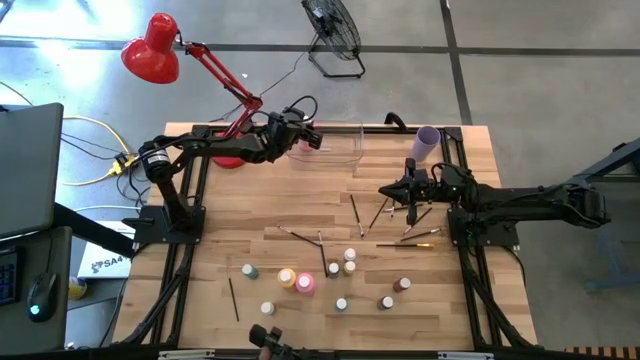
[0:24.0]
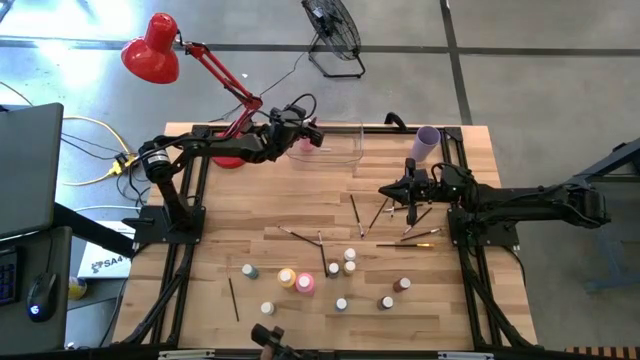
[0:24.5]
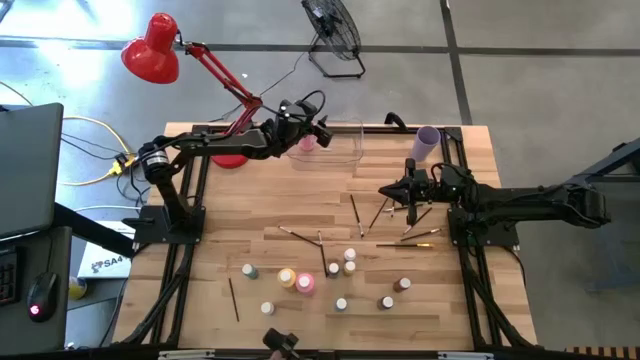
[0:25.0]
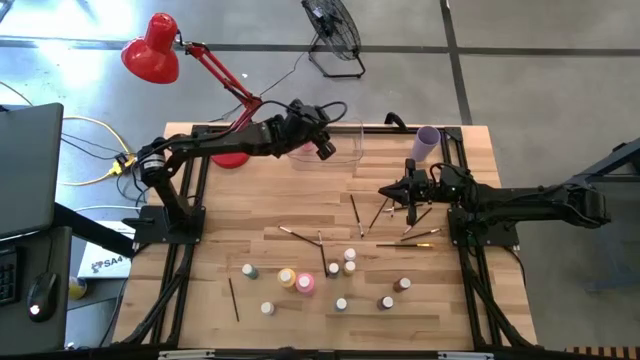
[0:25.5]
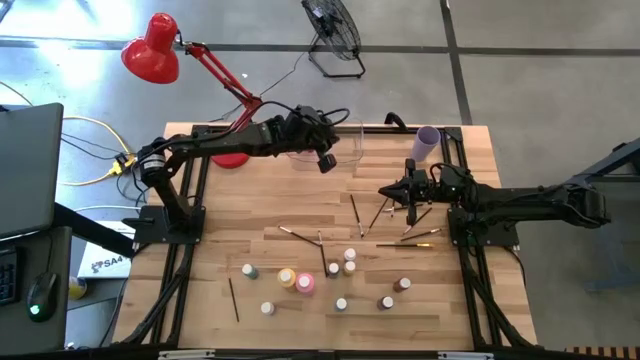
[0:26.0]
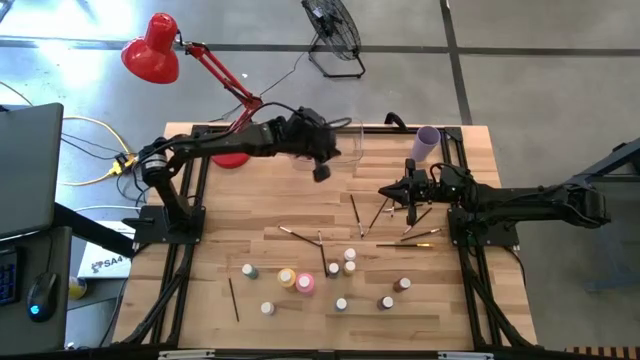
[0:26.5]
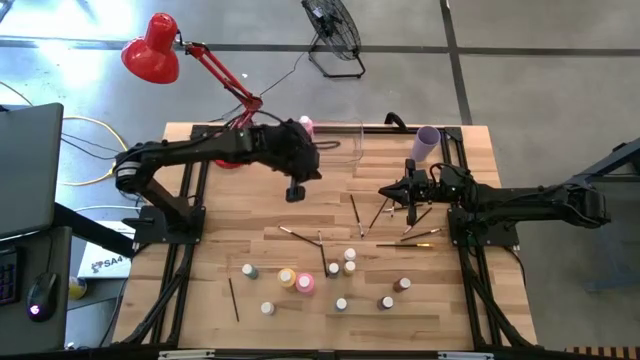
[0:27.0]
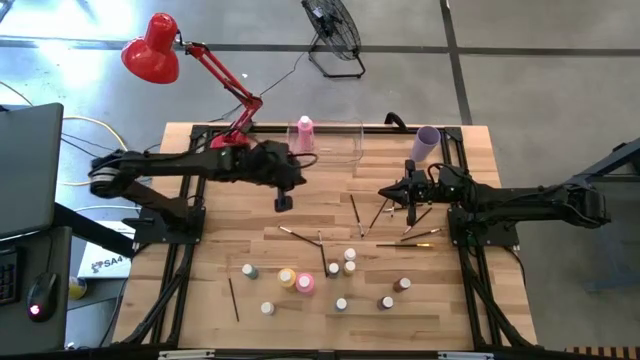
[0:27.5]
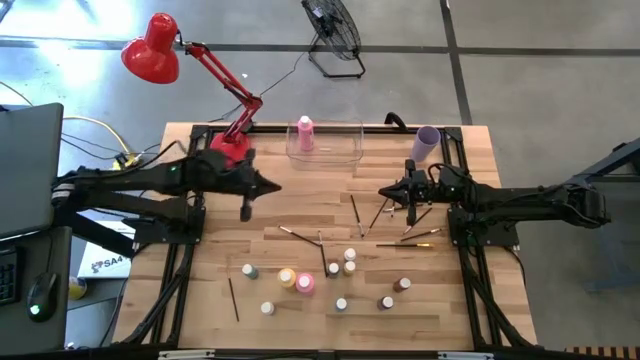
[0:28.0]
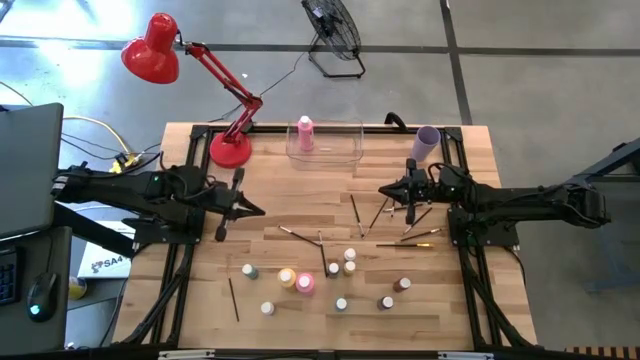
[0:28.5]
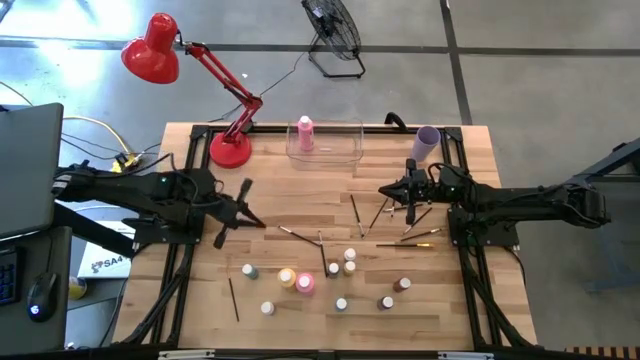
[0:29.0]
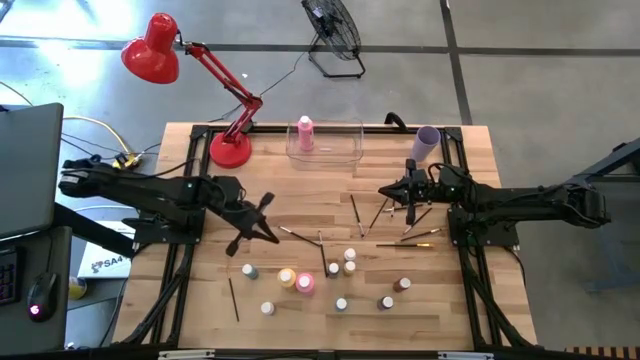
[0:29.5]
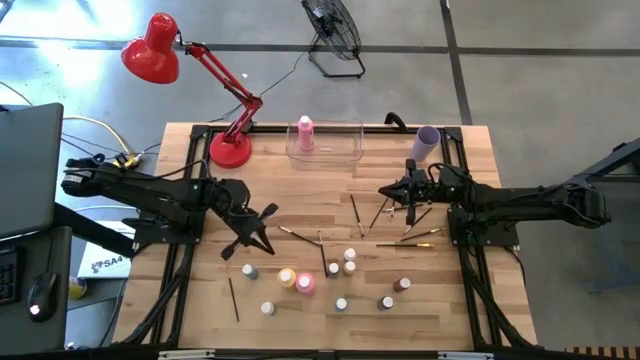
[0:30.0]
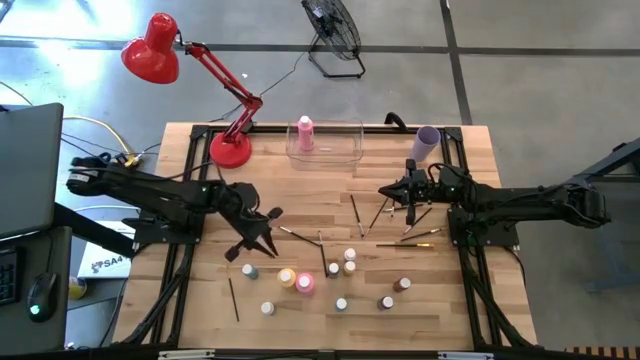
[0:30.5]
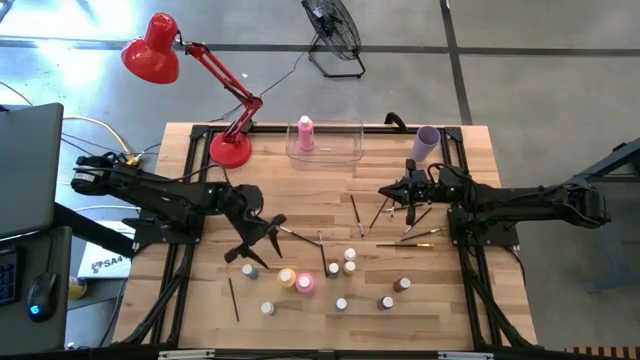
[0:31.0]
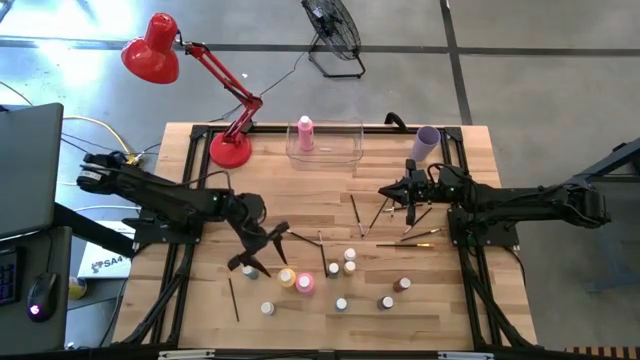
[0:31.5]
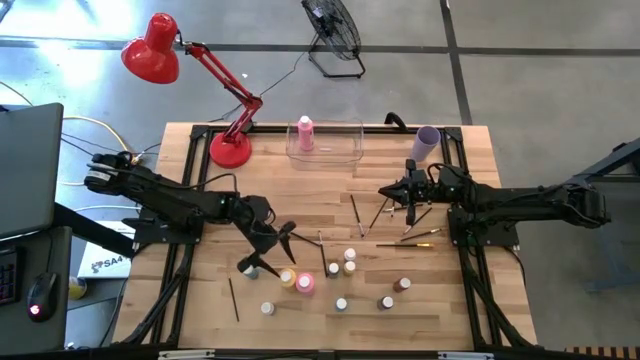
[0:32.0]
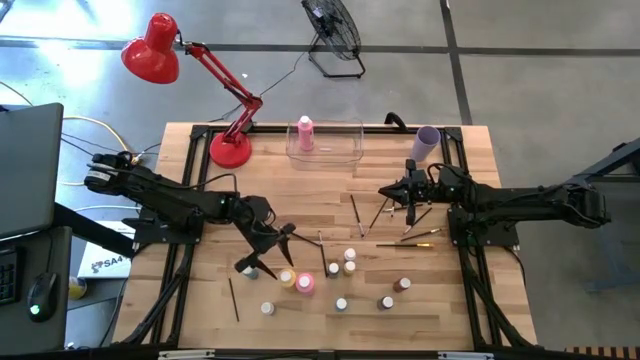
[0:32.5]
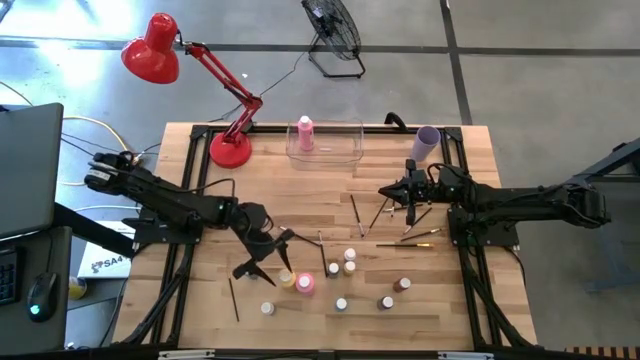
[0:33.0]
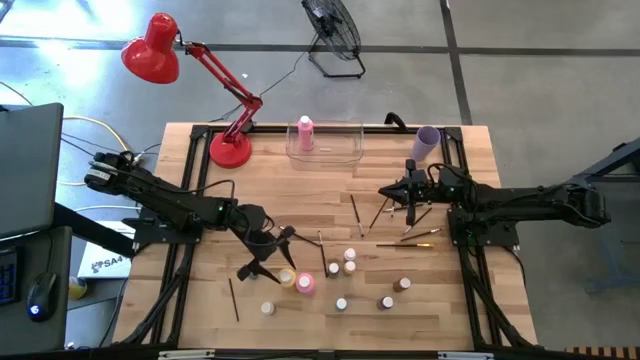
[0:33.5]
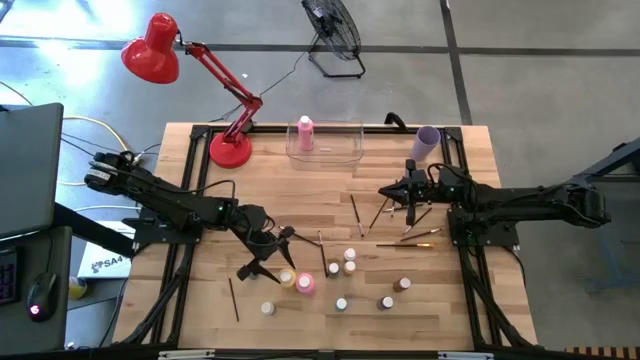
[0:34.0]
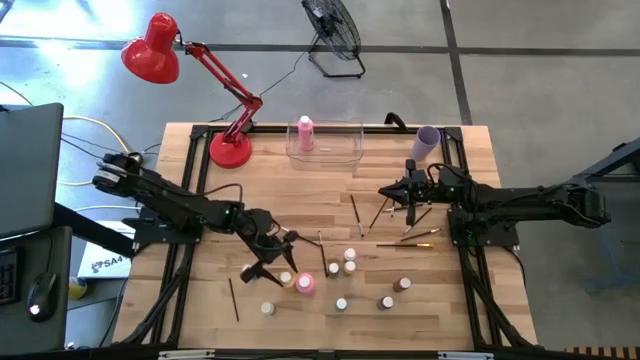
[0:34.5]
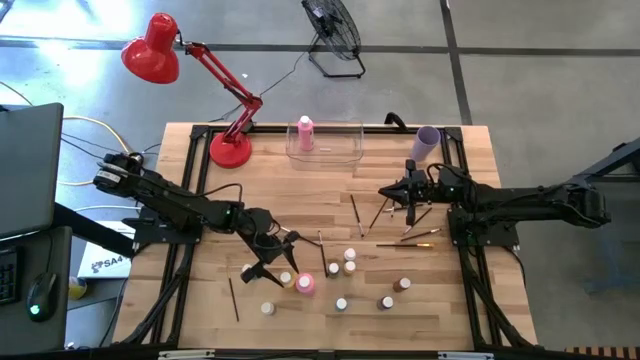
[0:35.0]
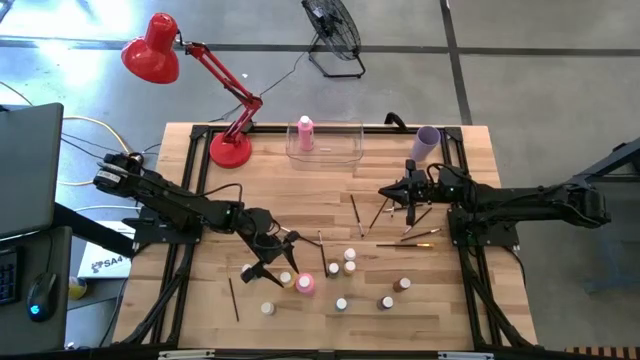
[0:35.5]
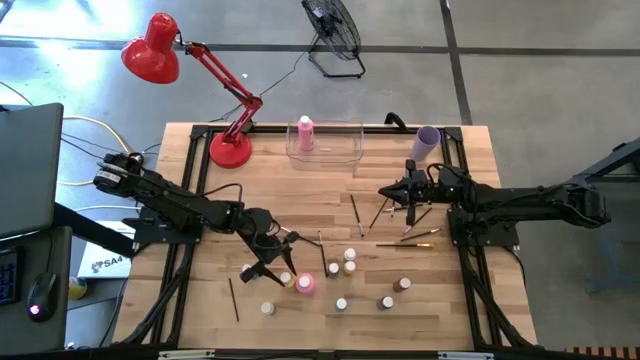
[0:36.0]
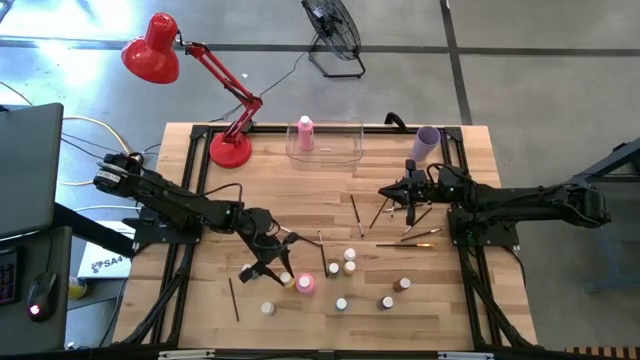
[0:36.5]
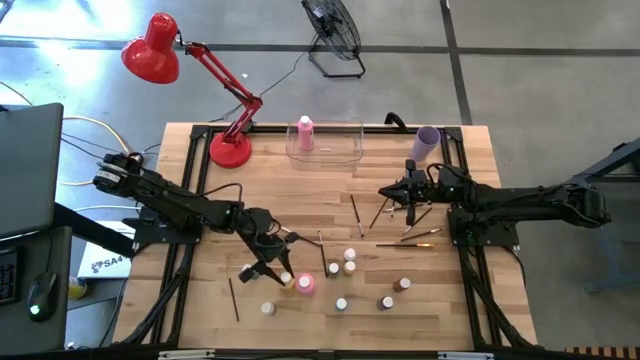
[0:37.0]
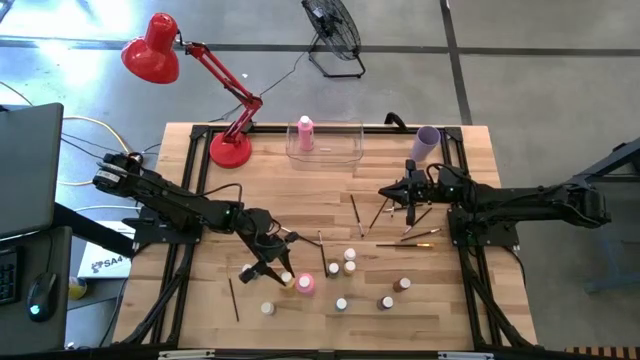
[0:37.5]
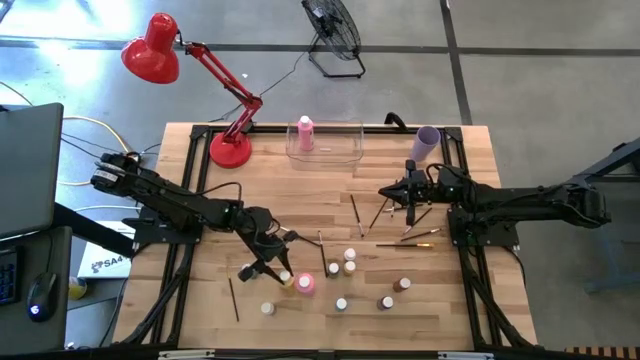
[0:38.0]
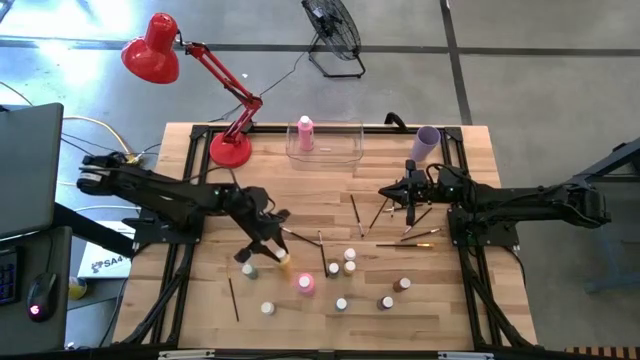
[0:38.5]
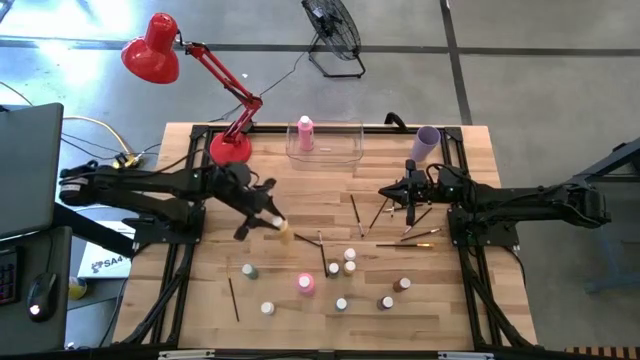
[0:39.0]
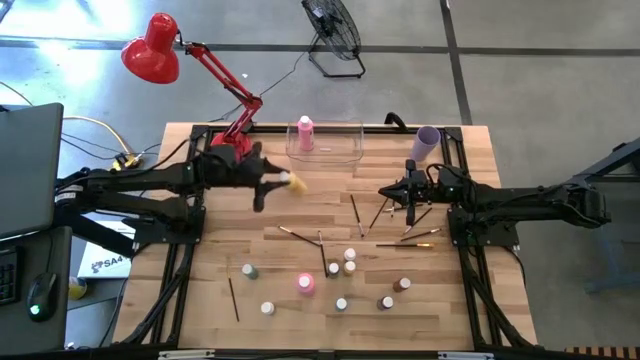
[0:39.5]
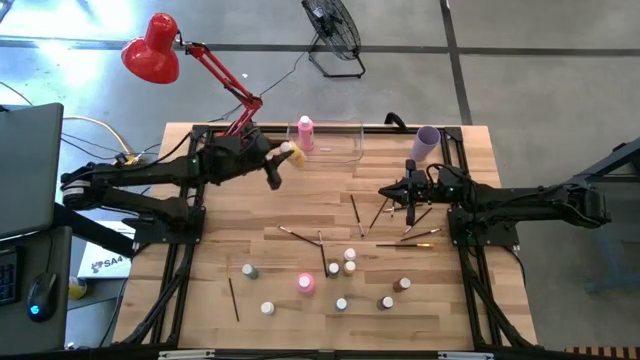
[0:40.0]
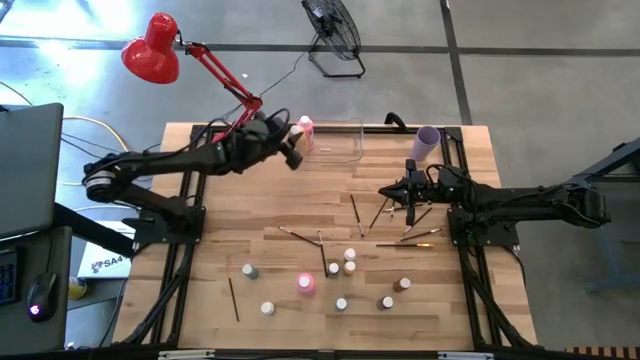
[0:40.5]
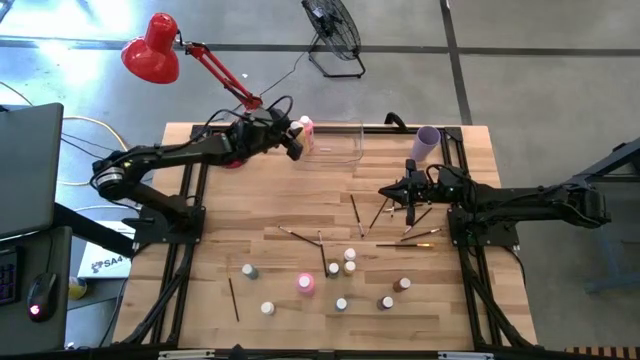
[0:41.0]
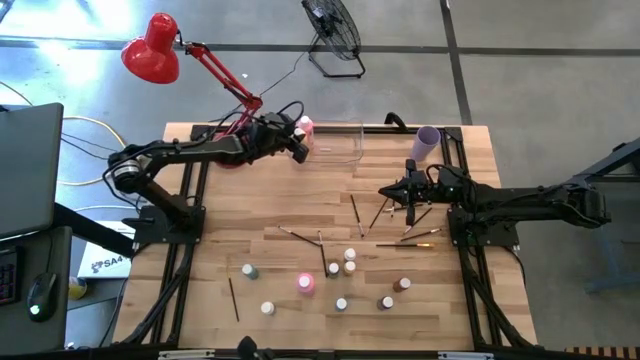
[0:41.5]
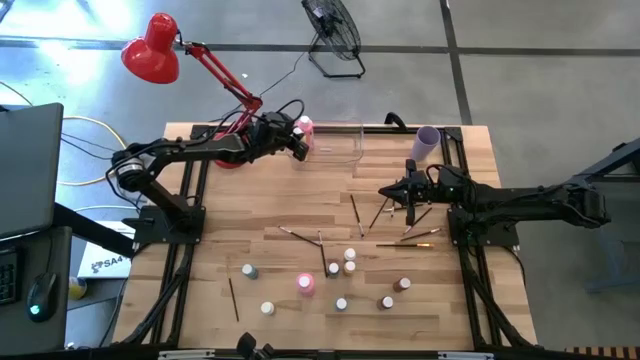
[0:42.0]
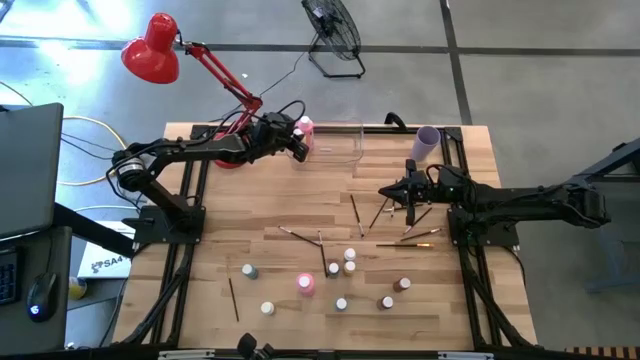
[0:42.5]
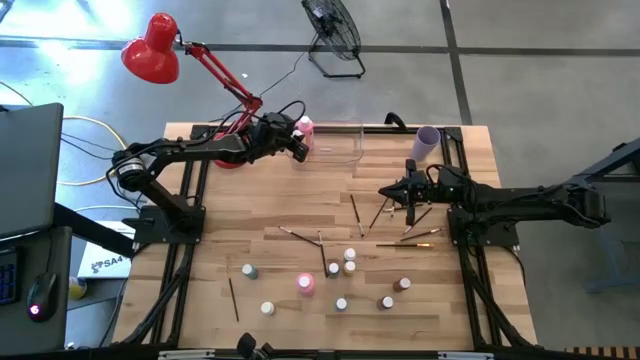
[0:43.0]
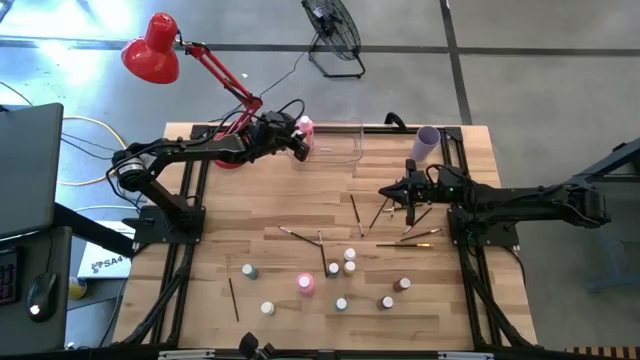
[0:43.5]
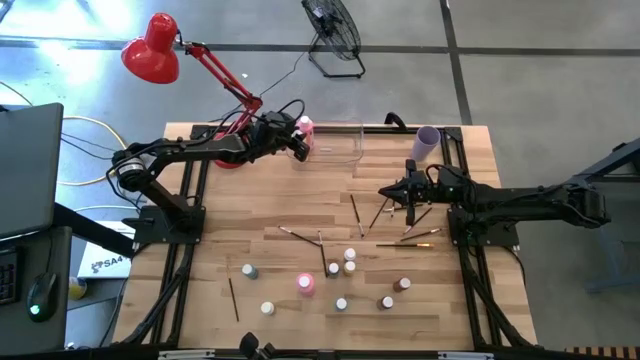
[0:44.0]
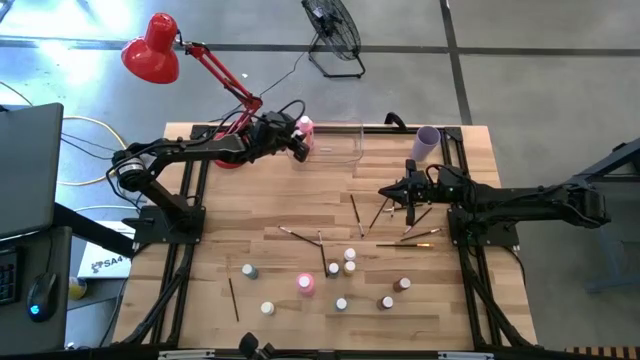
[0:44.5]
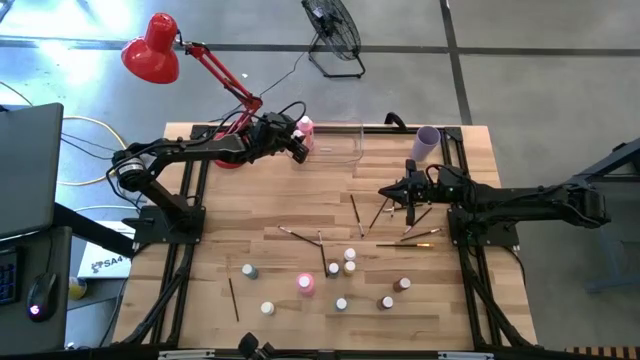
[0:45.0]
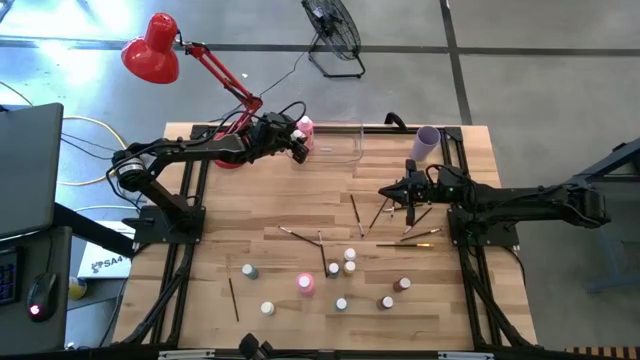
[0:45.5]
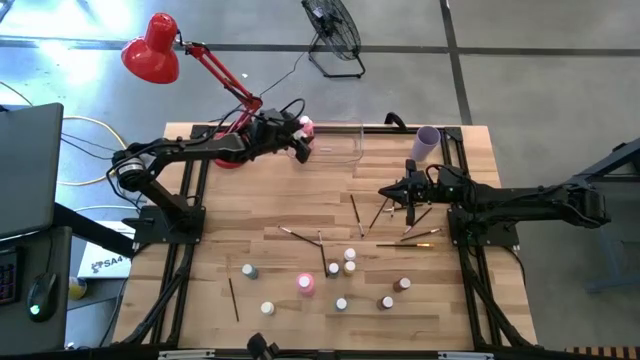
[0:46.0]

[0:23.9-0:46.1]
Task: Pick & Place Paint Supplies
Put the large yellow paint bottle into the transparent bin
